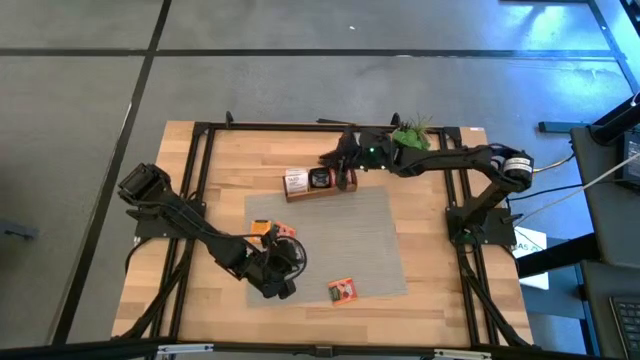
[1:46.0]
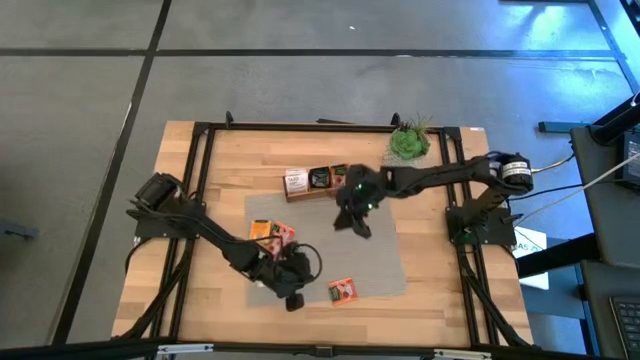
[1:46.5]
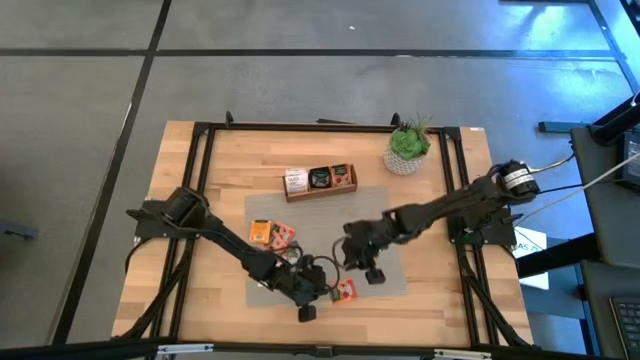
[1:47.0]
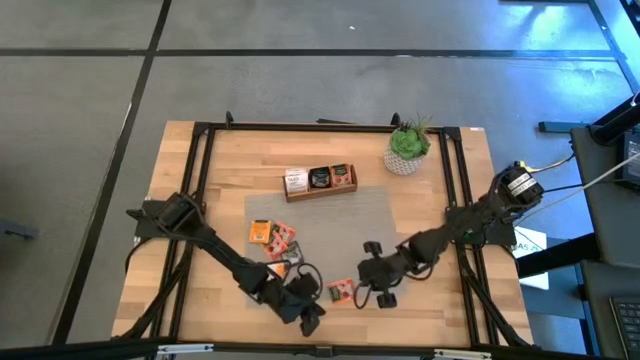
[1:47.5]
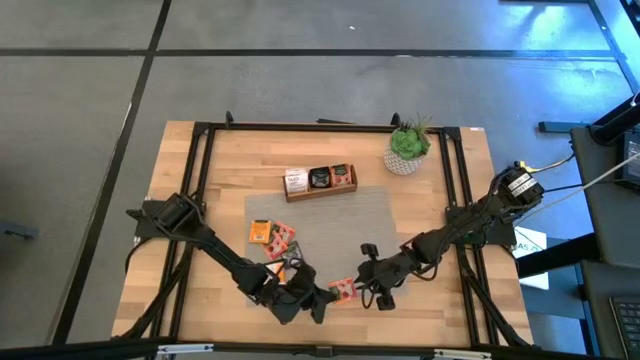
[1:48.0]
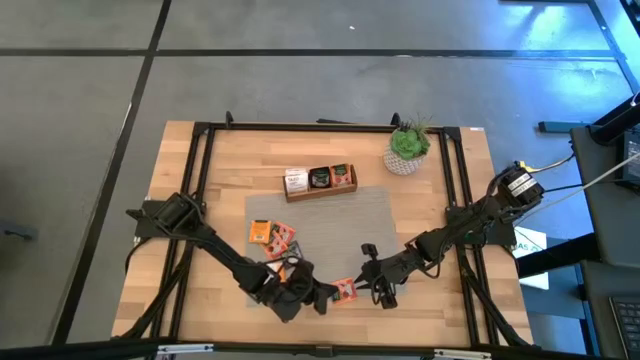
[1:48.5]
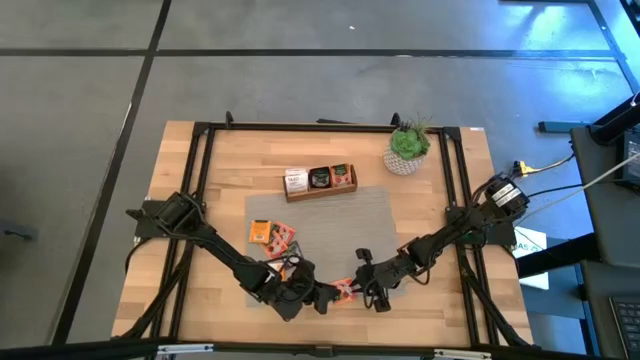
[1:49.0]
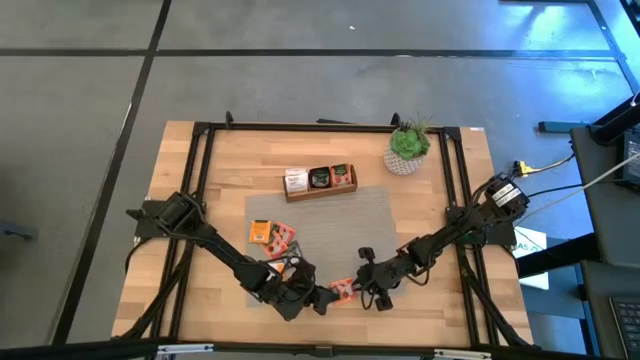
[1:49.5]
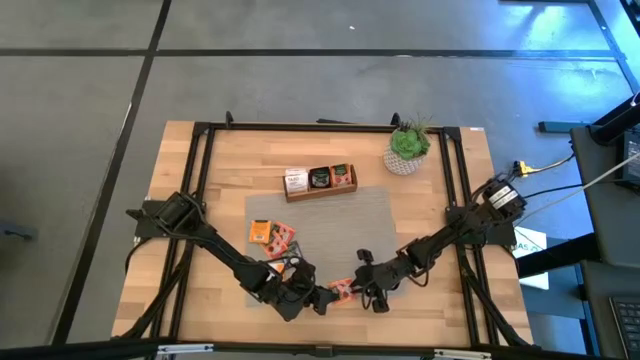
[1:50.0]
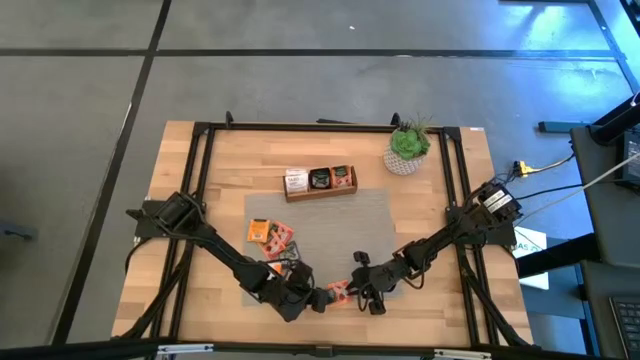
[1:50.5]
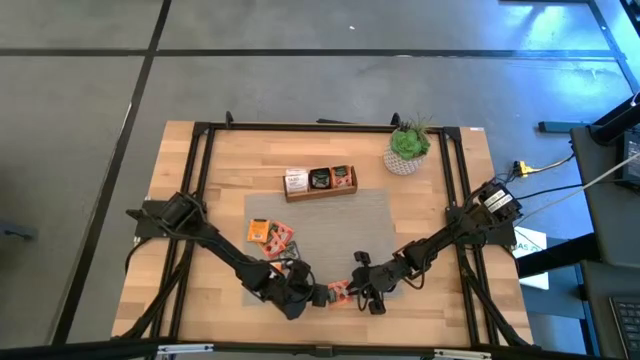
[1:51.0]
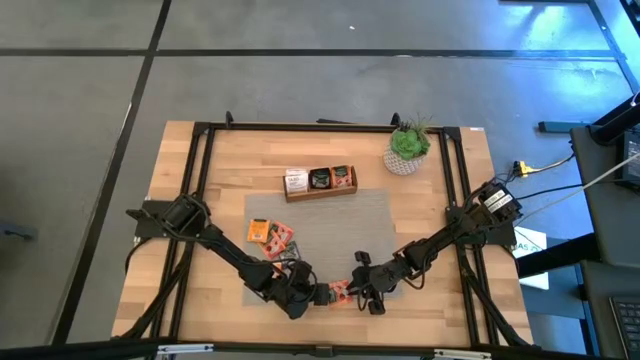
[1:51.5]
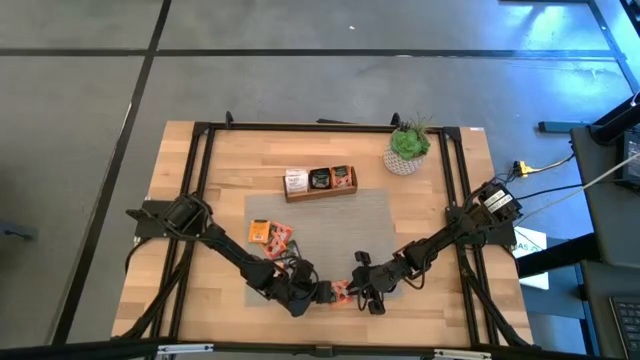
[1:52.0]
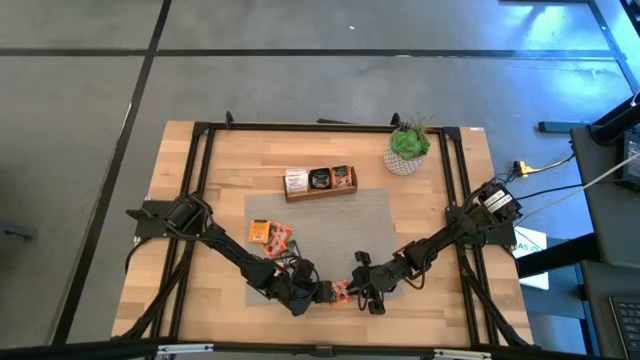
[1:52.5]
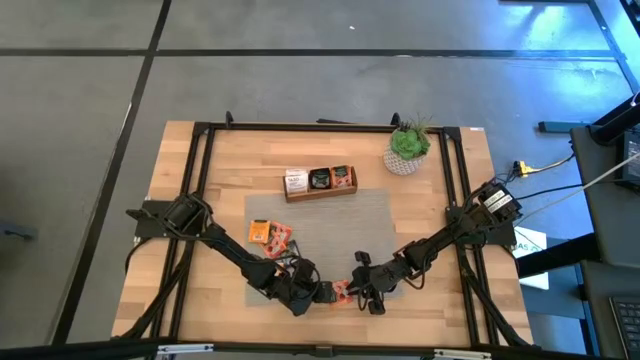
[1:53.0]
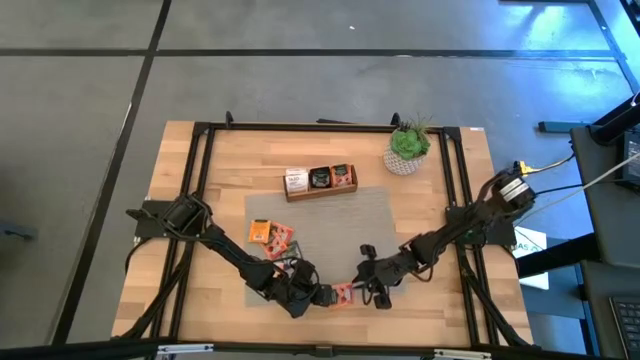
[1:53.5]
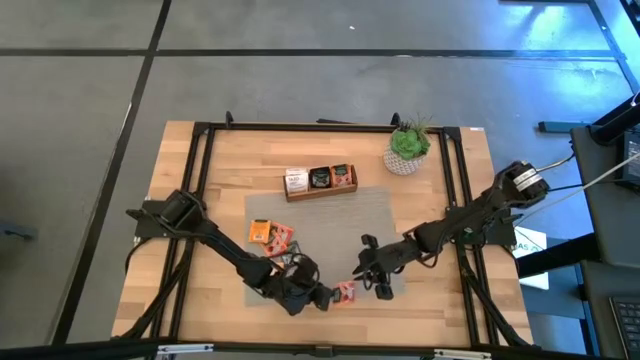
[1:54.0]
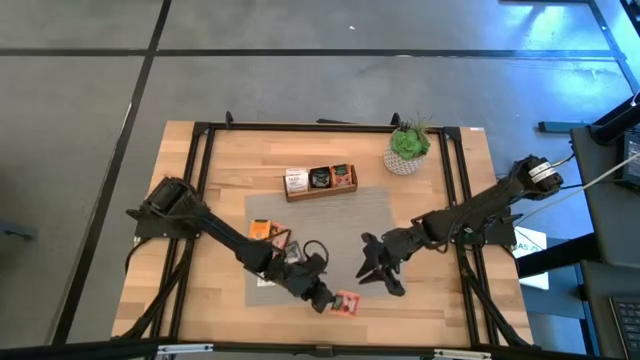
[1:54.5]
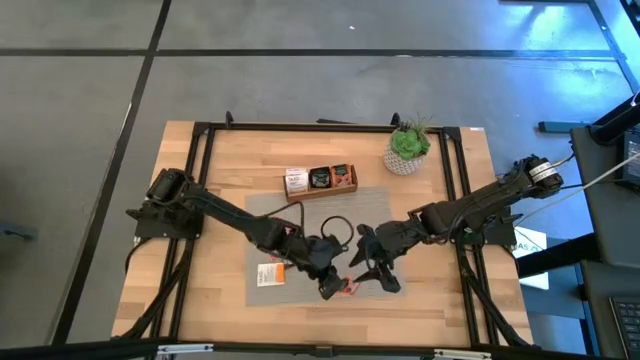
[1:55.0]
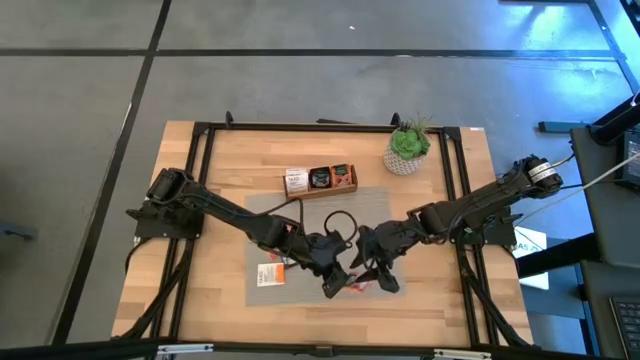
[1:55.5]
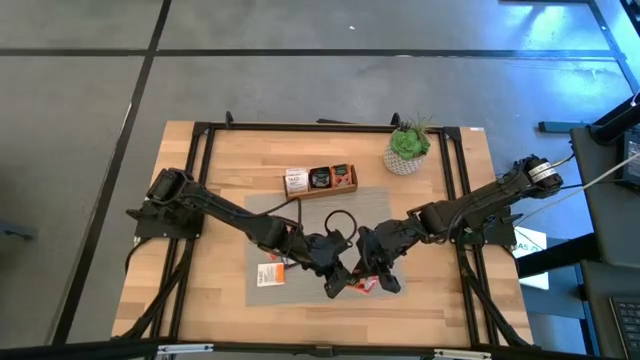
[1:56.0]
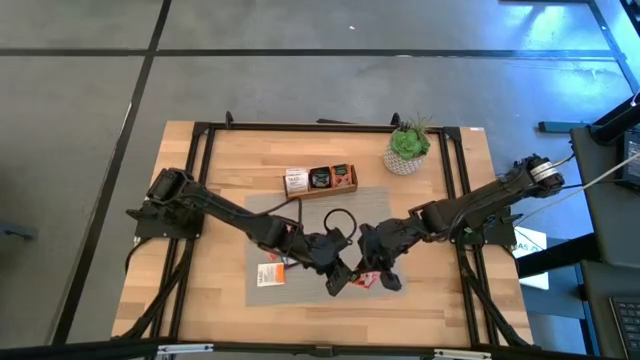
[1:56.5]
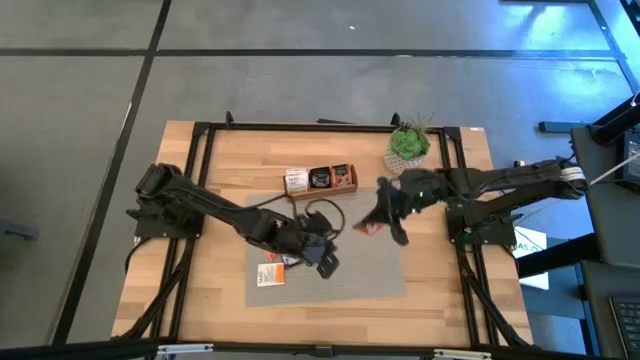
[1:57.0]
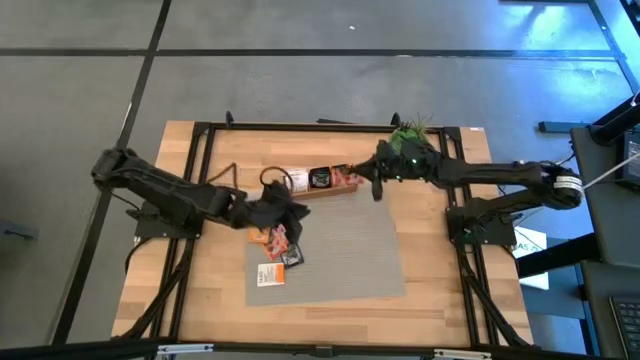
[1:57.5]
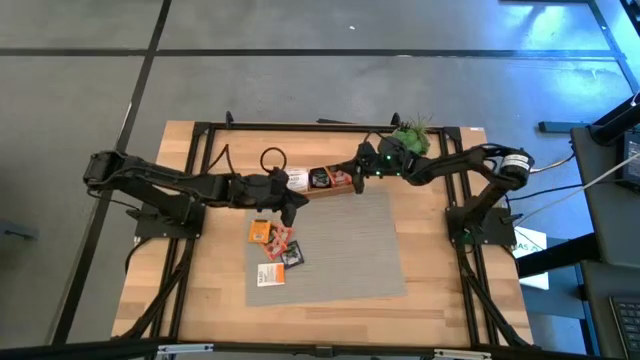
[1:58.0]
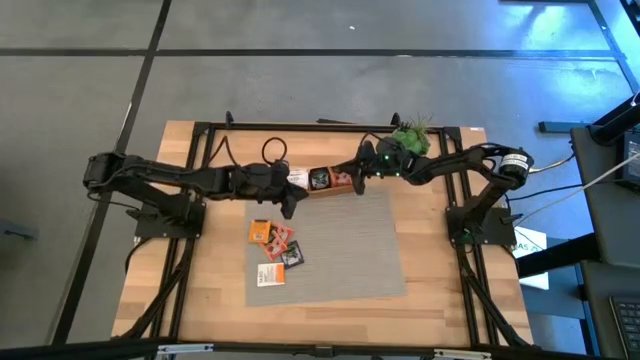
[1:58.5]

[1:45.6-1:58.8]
Task: Pick & Place Tea
Put the orange tea bag into the right section of the wooden organizer

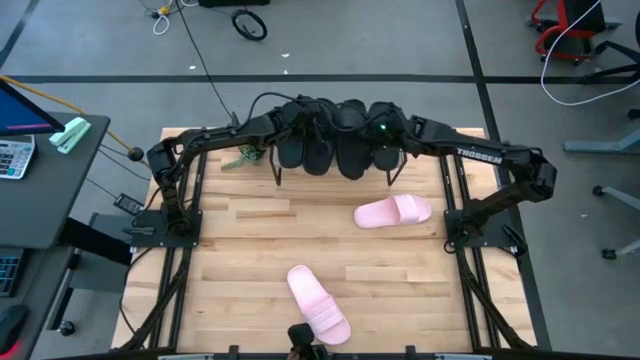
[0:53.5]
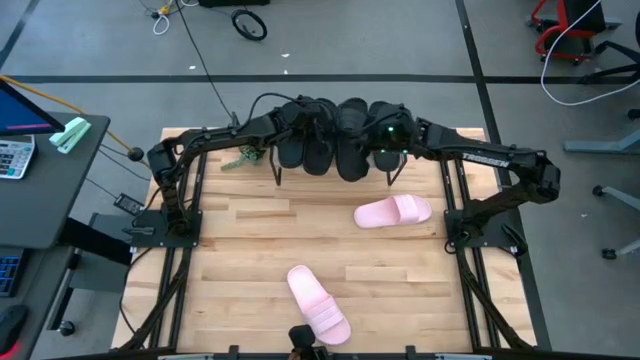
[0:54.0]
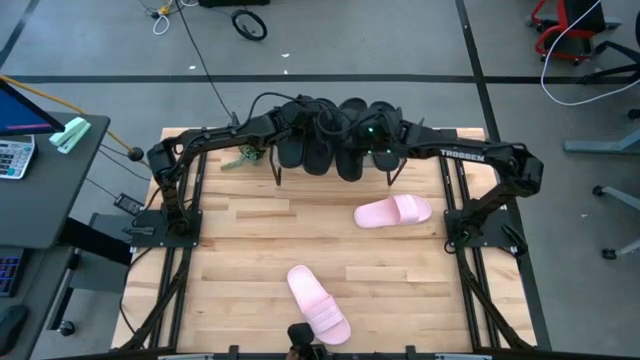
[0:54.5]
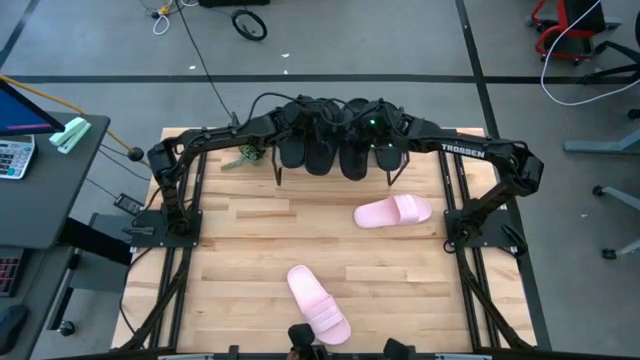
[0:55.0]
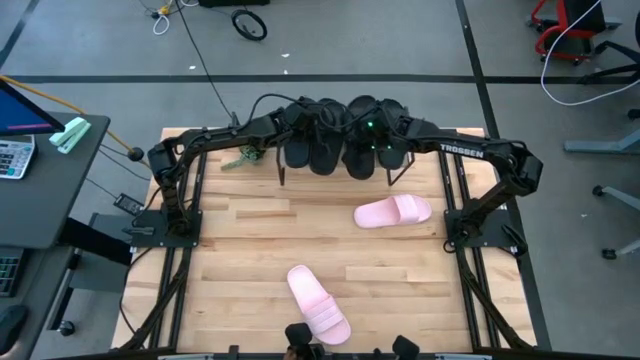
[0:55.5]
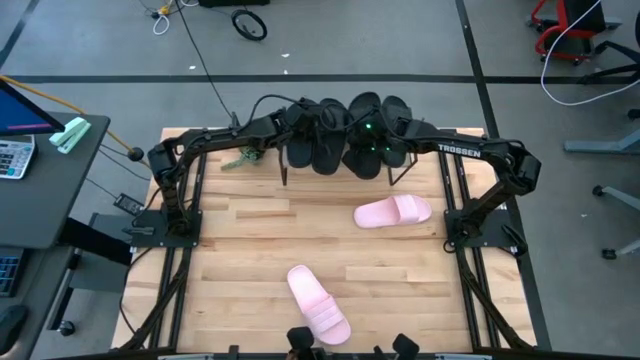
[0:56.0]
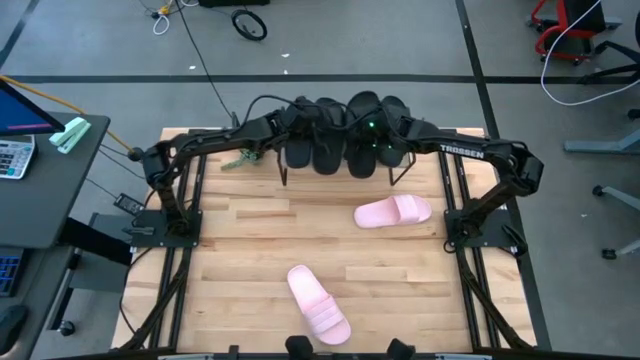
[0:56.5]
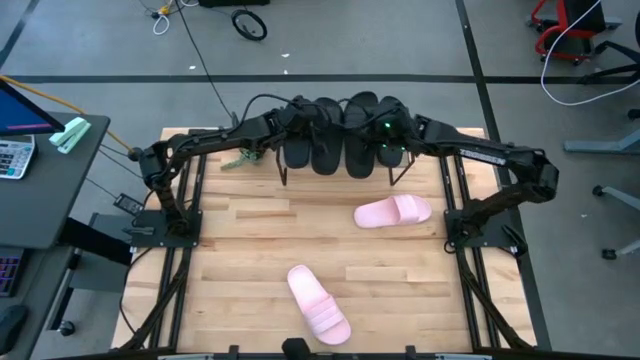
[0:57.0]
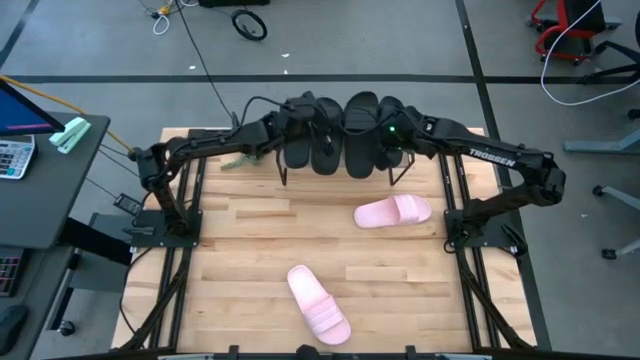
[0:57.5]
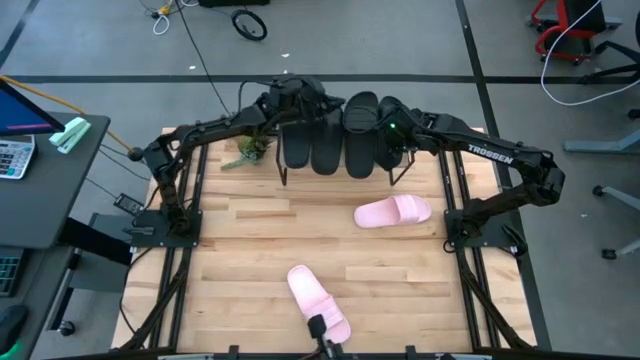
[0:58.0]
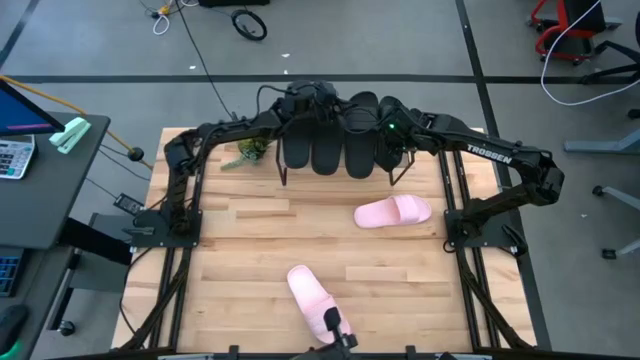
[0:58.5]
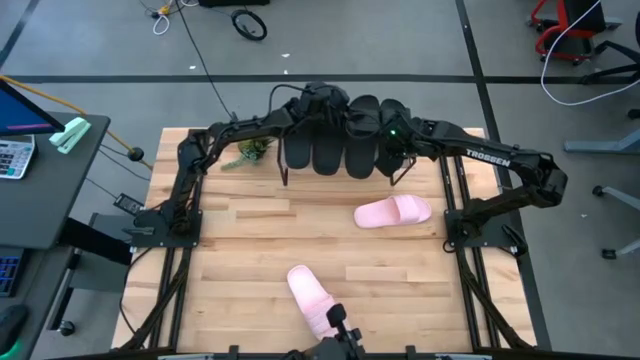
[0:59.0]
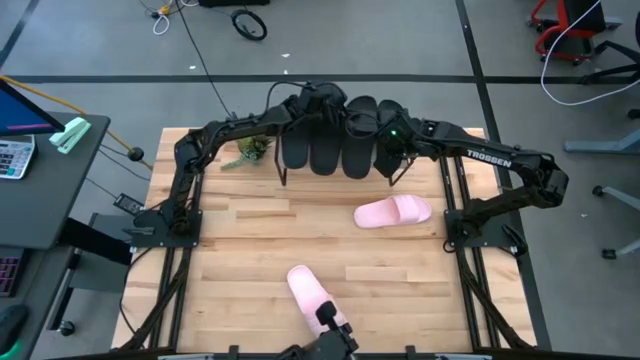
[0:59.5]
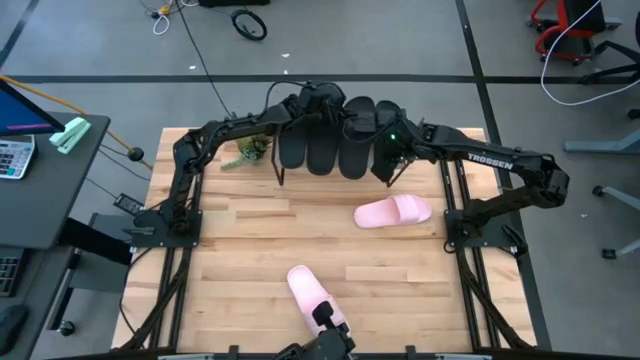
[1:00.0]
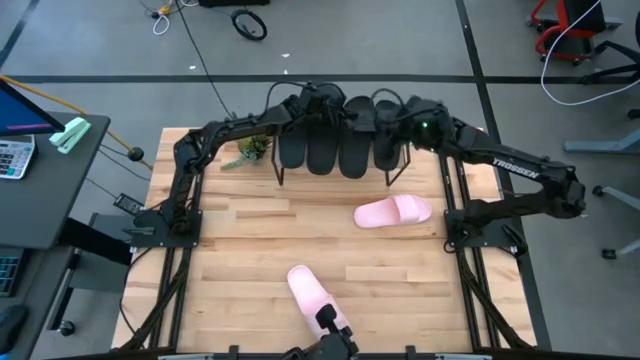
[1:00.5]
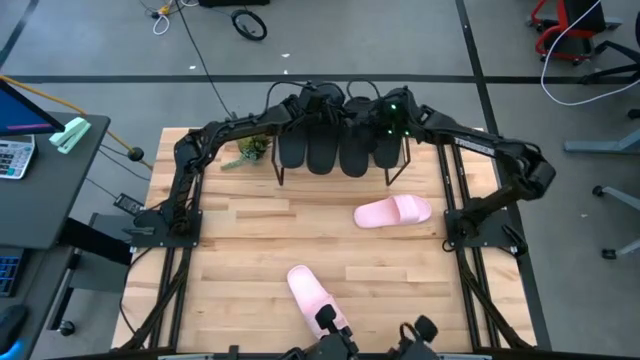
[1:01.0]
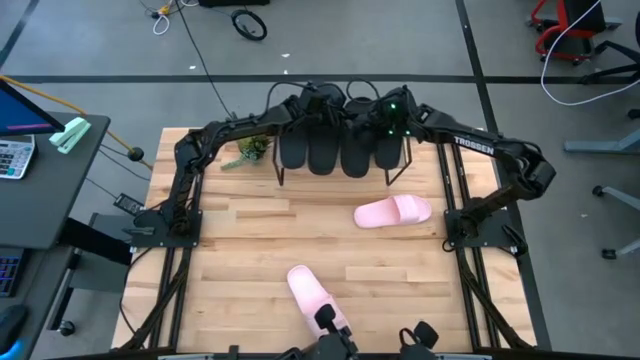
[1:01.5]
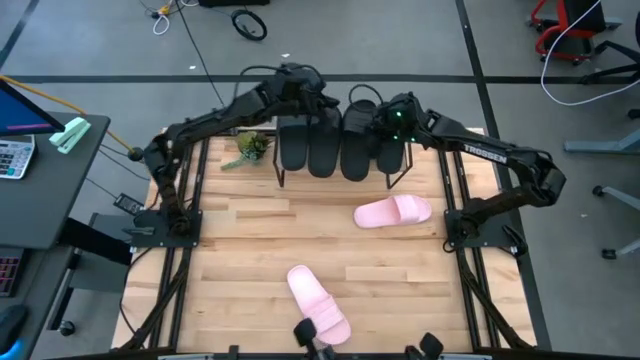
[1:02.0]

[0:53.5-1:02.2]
Task: Pick and place slides into the shelf
Put the black slide on the shelf
